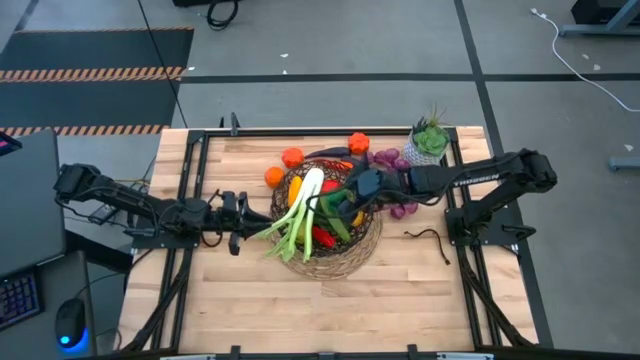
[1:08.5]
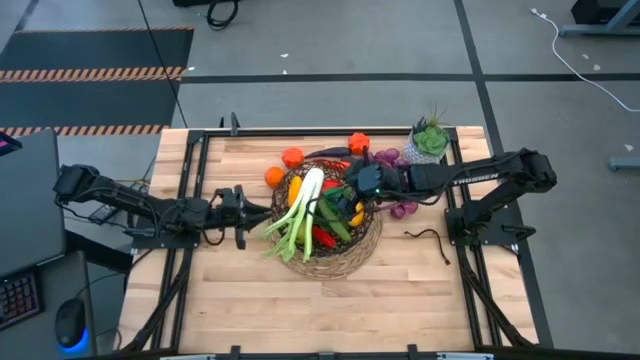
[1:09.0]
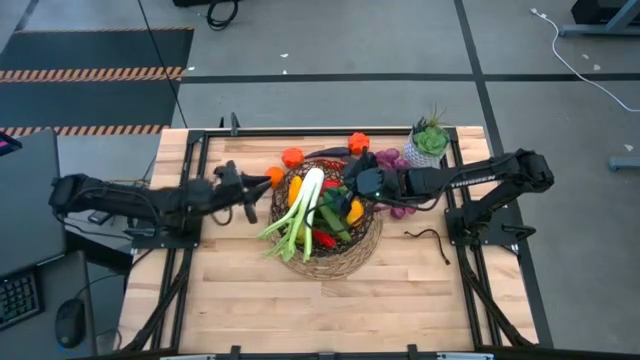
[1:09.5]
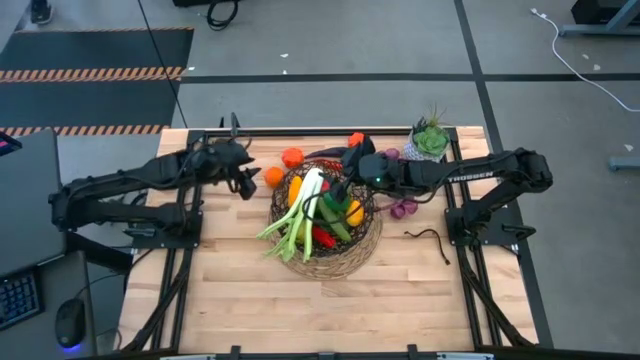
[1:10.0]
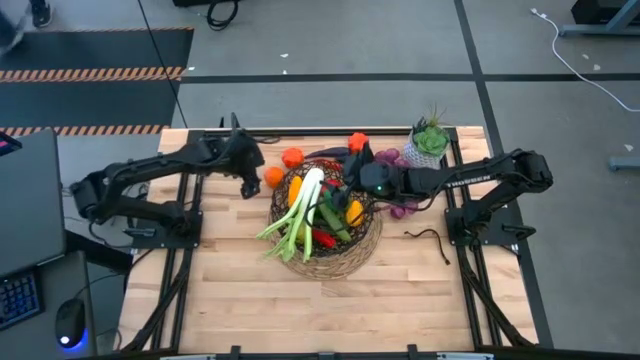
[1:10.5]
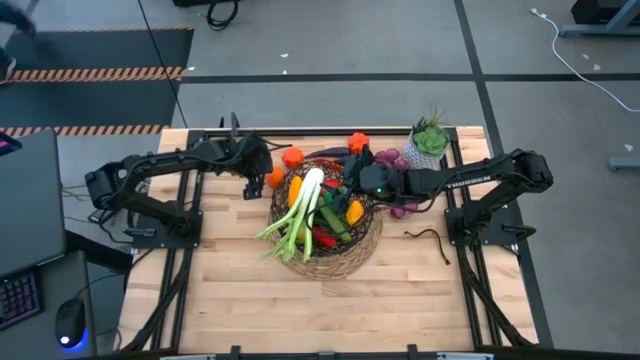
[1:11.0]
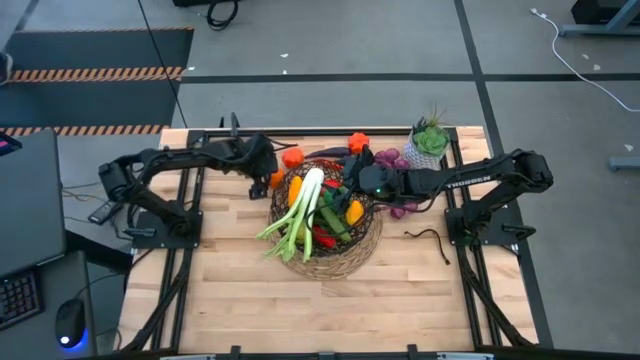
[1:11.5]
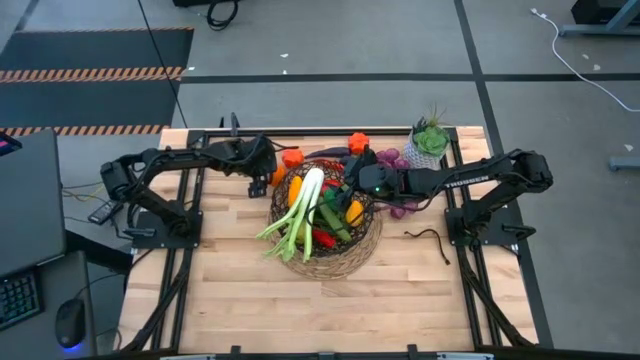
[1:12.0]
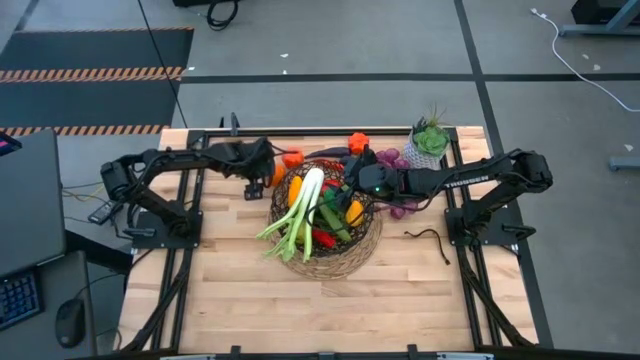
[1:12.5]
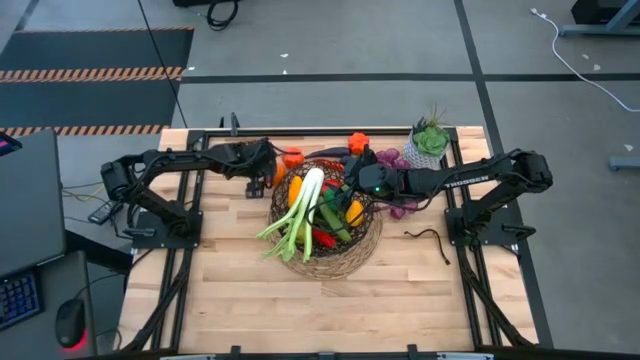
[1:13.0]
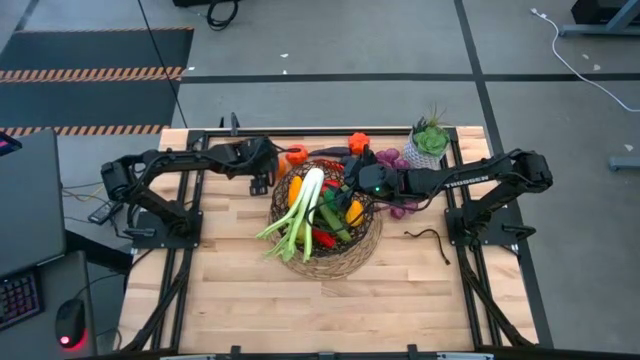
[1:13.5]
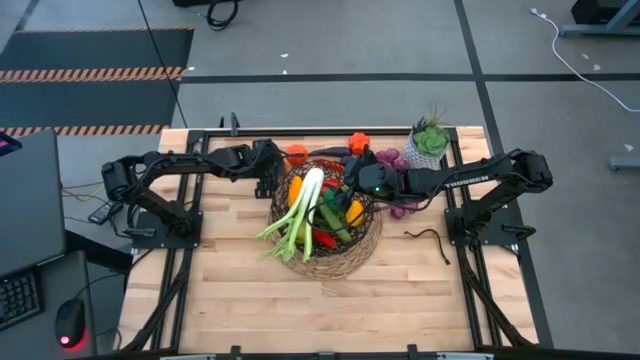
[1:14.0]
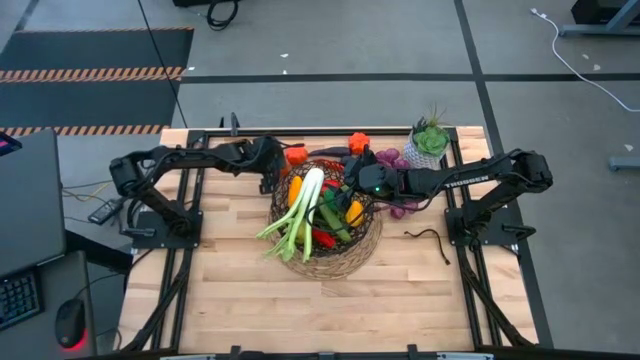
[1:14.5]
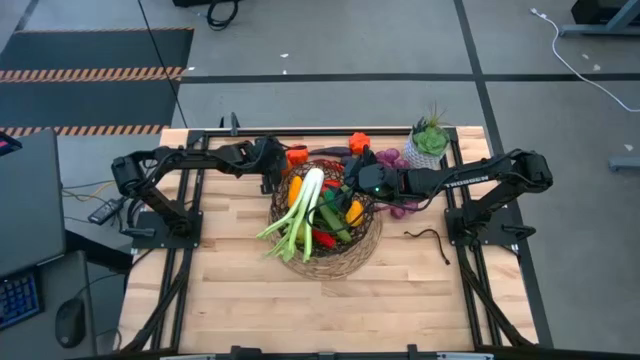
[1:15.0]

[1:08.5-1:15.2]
Task: Build produce basket
Put the orange into the black basket

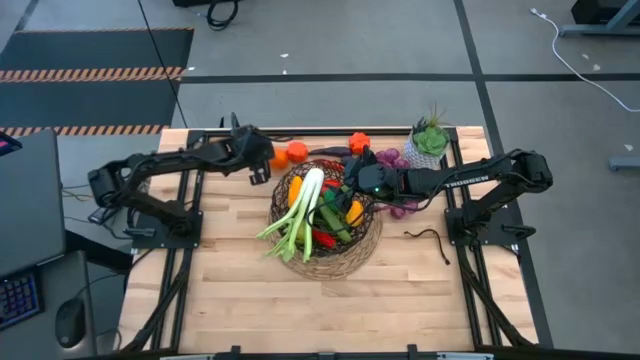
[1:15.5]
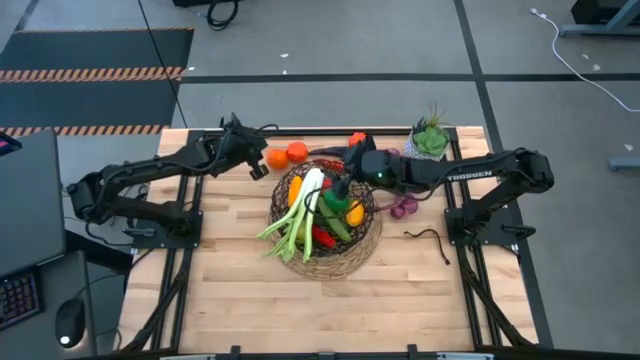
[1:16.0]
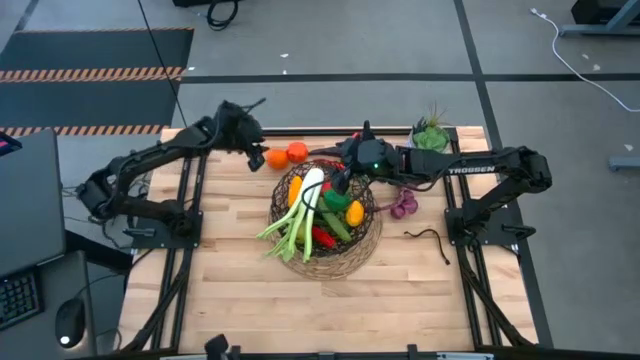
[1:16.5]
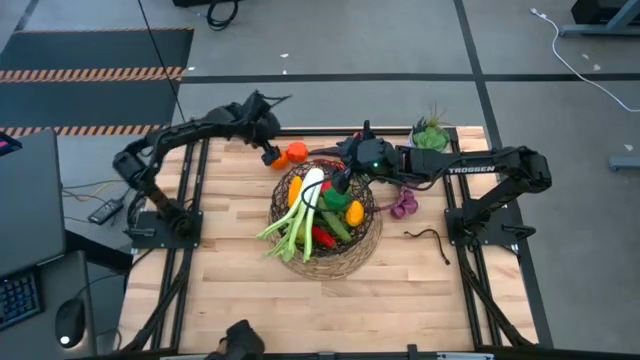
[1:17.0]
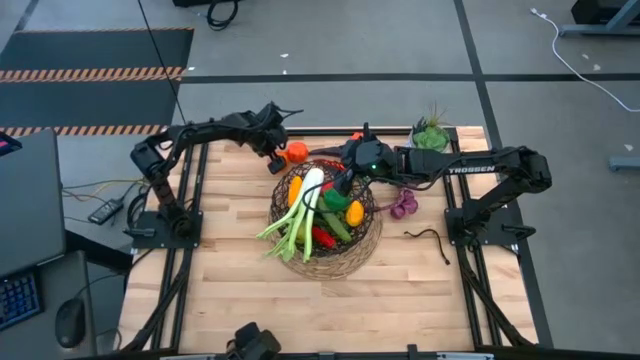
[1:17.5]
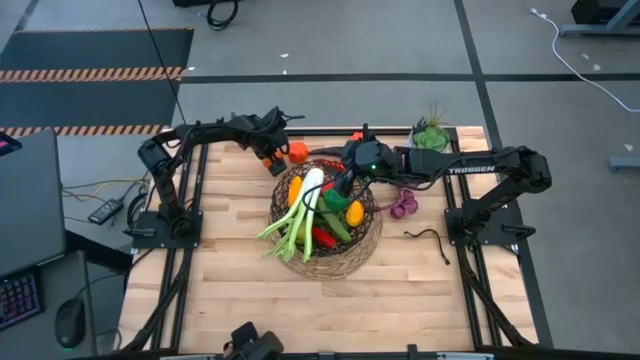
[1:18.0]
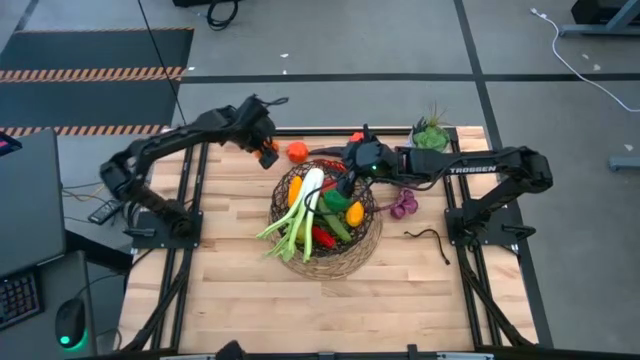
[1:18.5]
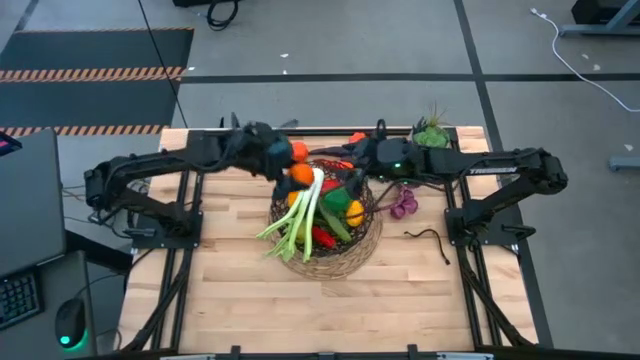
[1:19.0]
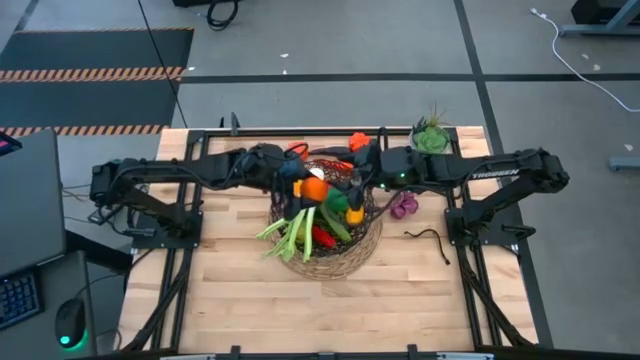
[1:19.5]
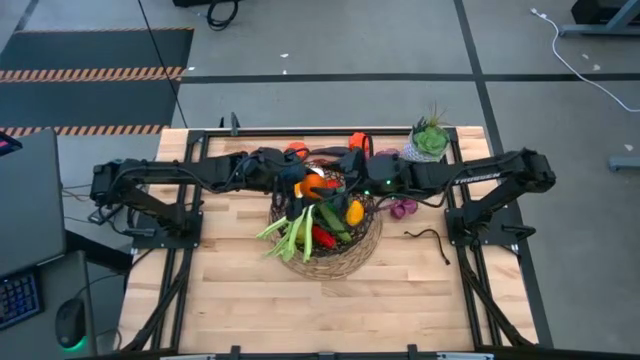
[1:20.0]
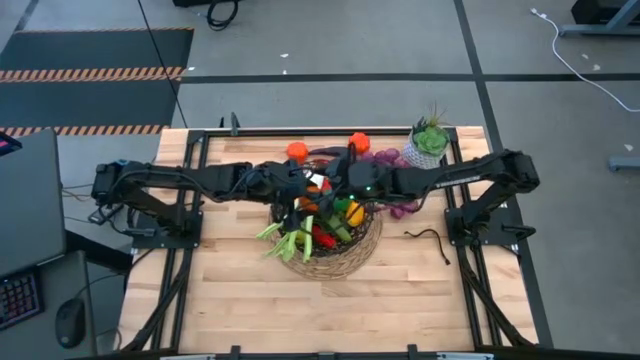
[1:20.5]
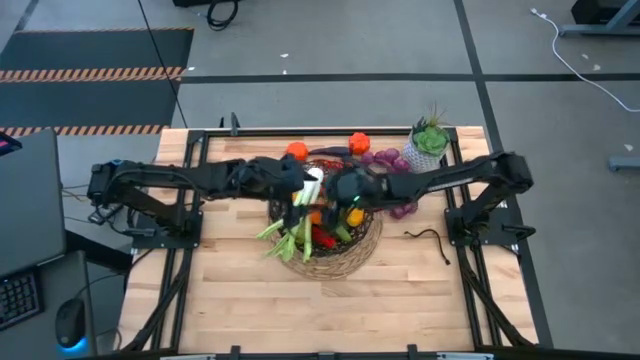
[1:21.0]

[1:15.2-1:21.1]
Put the orange into the black basket

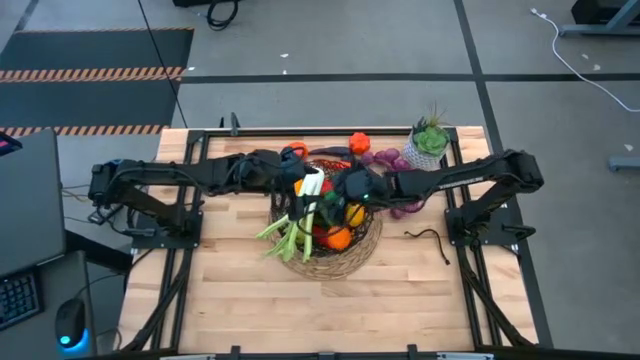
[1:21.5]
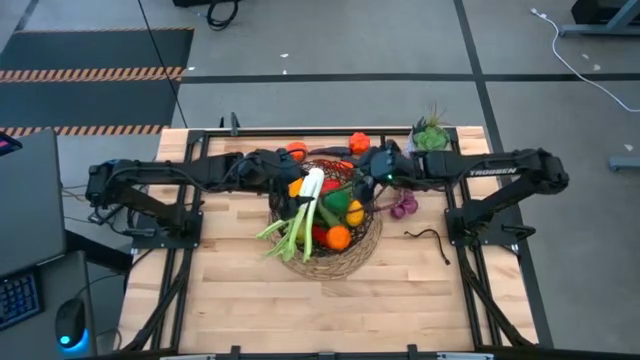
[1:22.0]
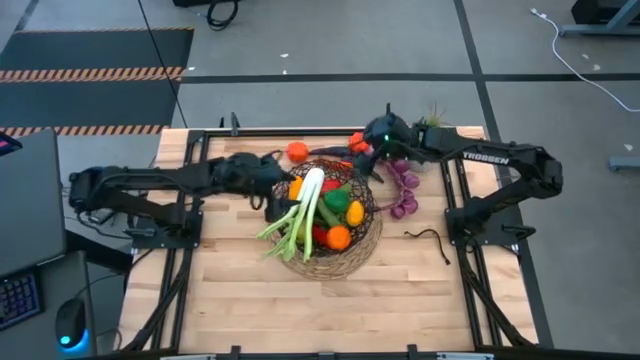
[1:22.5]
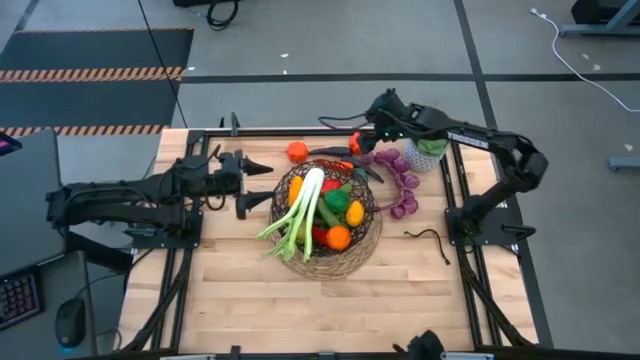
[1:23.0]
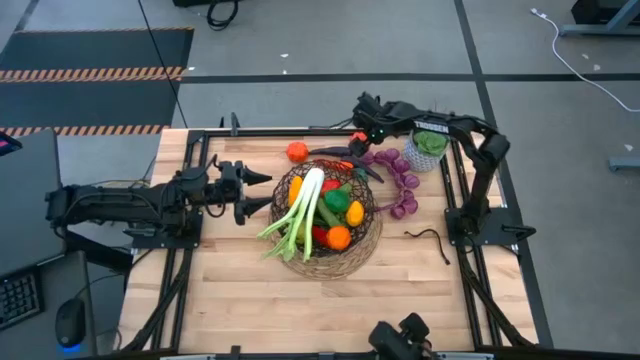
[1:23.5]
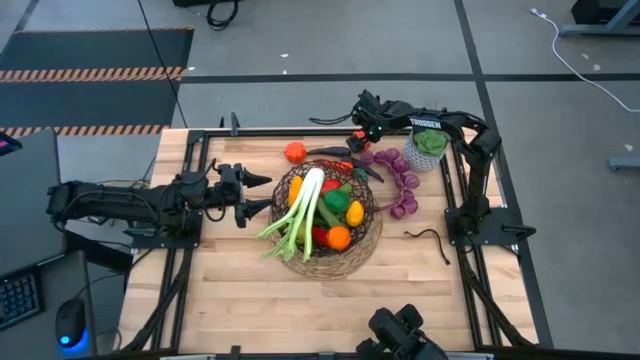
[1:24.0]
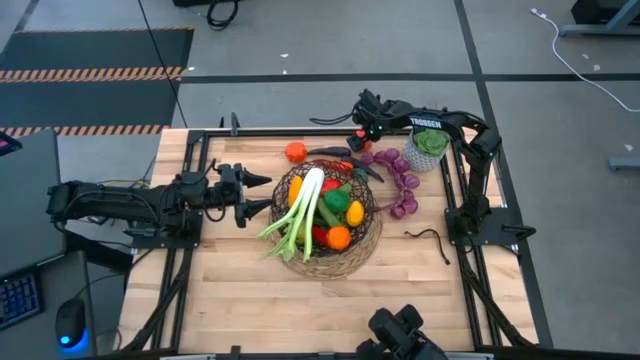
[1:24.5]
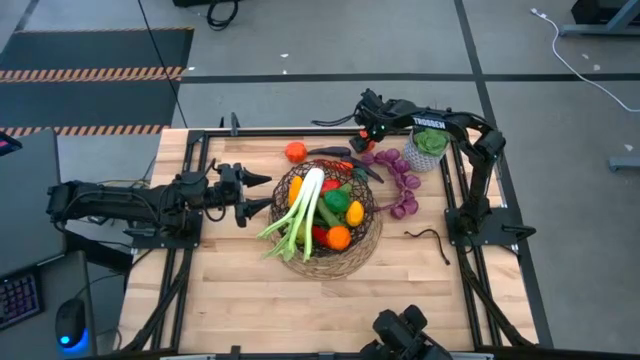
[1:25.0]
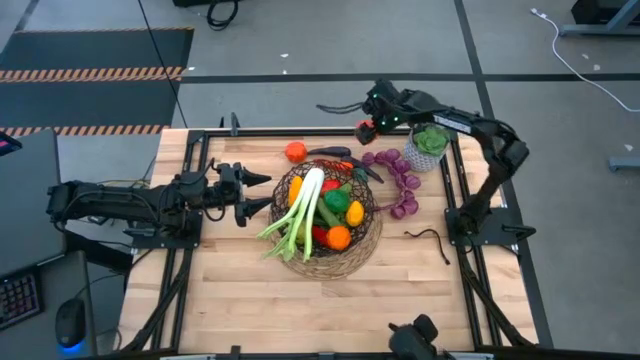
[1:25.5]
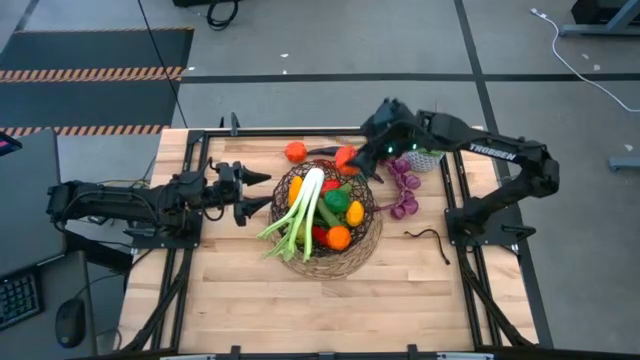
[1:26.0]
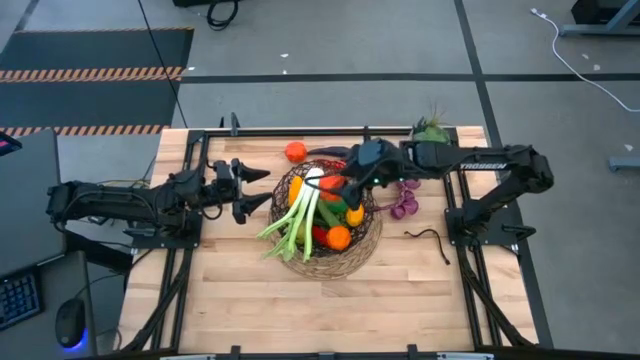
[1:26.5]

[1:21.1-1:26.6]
Put the right orange squash into the black basket

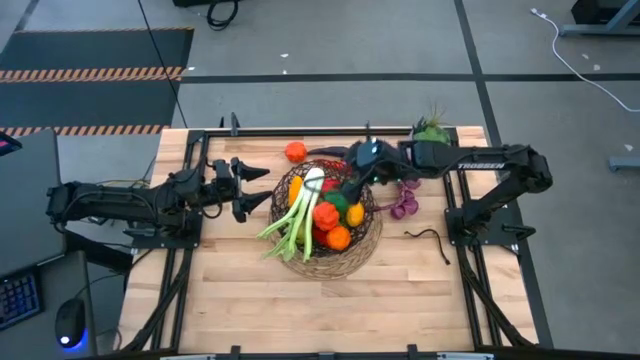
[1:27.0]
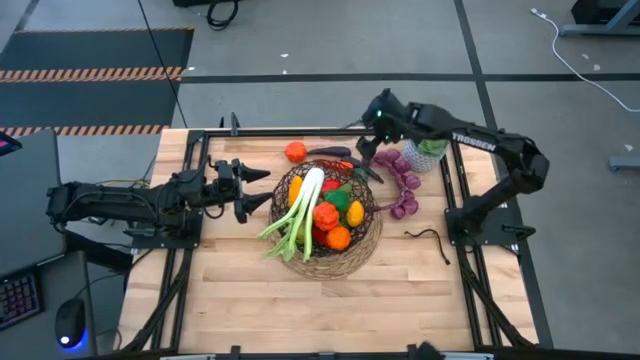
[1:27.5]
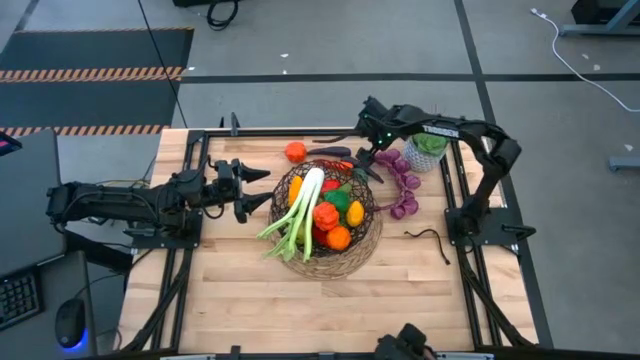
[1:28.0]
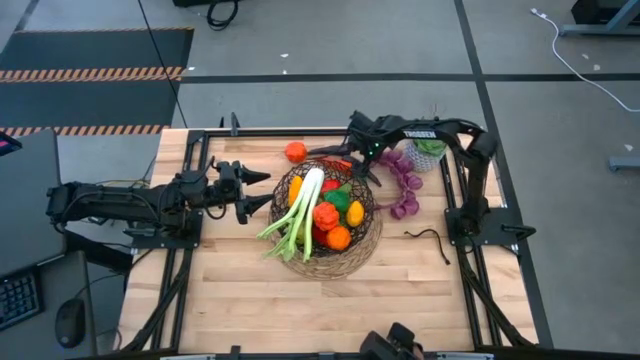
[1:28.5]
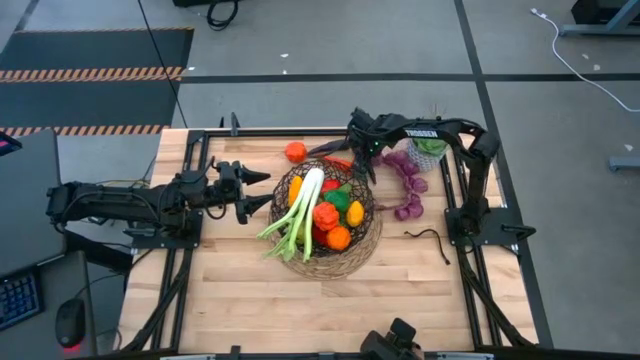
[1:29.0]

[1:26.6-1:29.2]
Put the right violet eggplant into the black basket

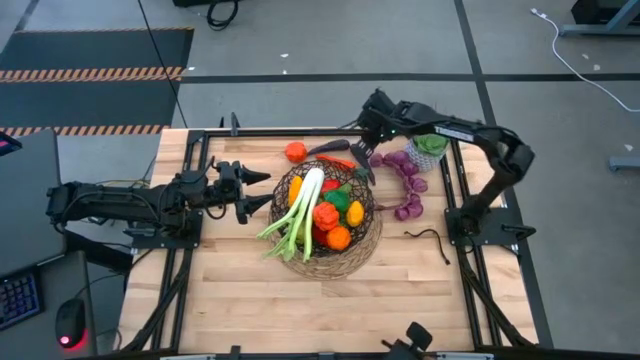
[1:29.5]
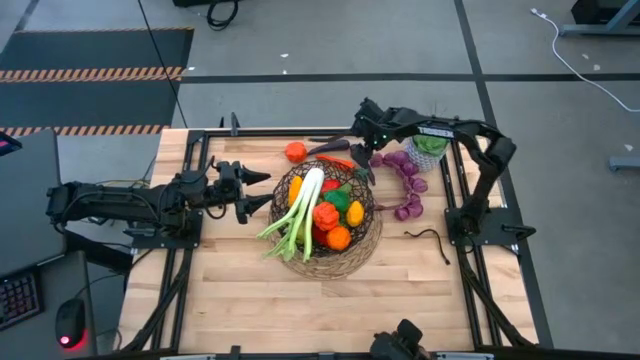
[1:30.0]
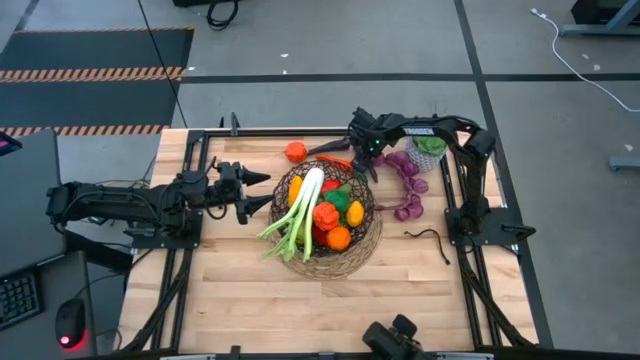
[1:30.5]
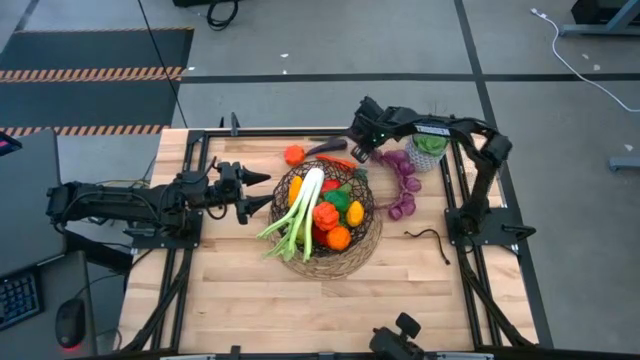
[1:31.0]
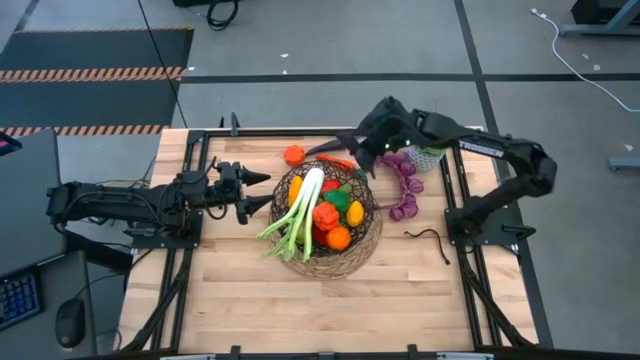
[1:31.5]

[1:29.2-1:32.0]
Put the right purple eggplant into the black basket
